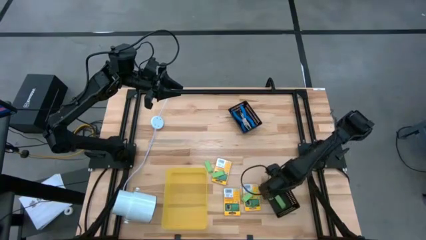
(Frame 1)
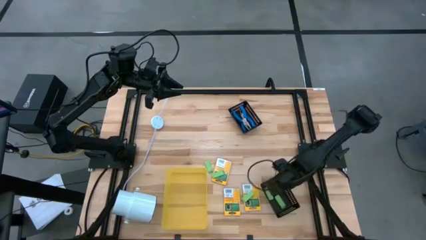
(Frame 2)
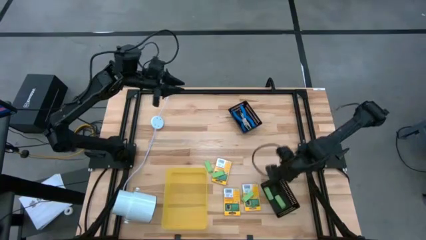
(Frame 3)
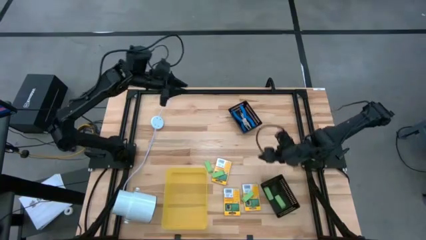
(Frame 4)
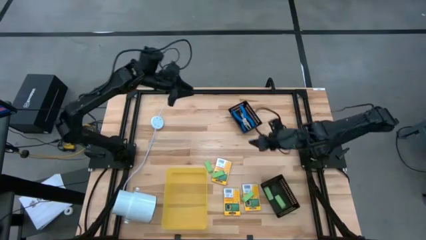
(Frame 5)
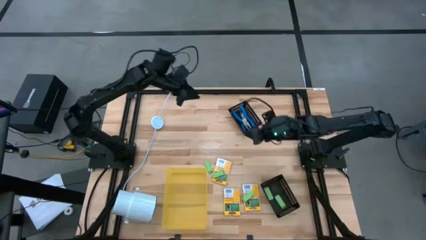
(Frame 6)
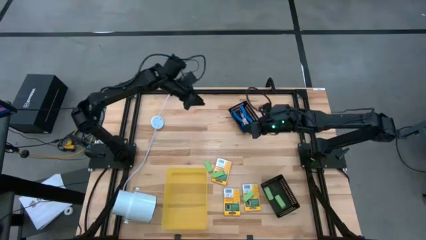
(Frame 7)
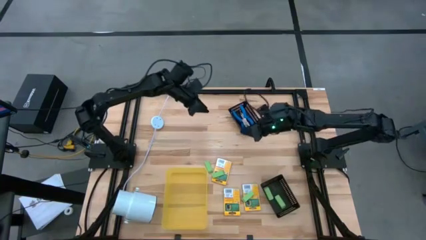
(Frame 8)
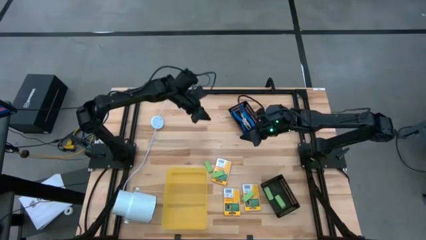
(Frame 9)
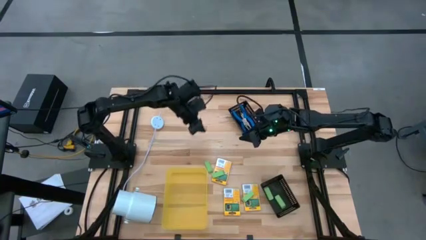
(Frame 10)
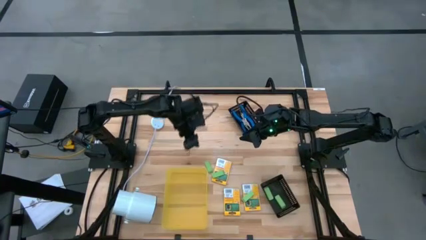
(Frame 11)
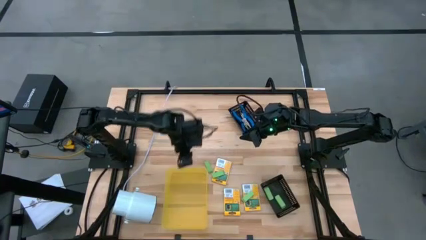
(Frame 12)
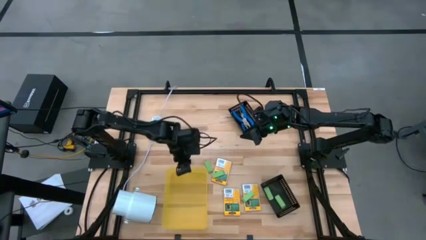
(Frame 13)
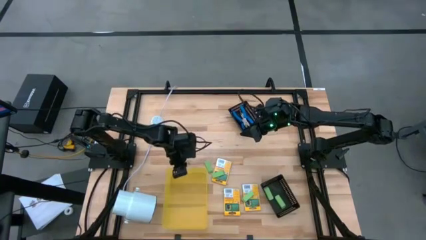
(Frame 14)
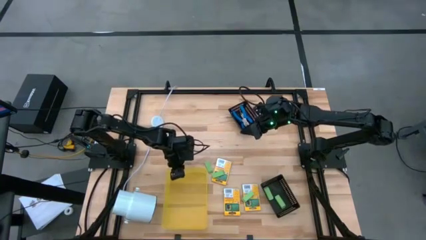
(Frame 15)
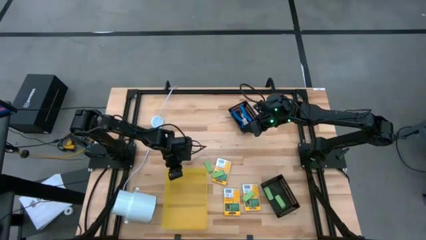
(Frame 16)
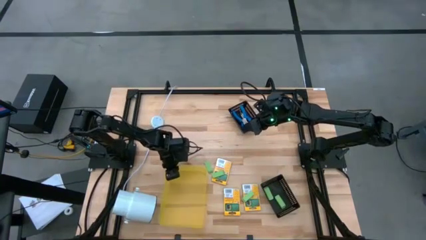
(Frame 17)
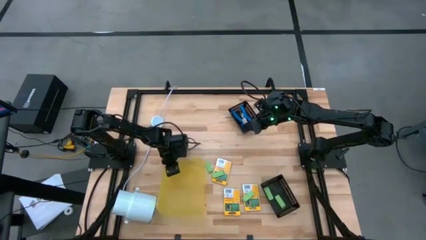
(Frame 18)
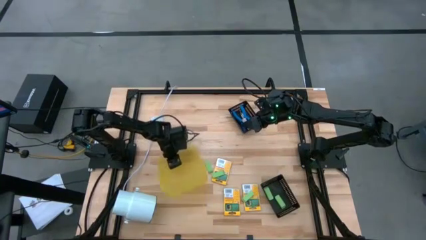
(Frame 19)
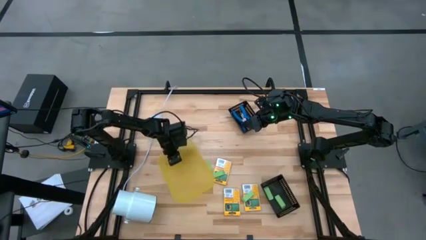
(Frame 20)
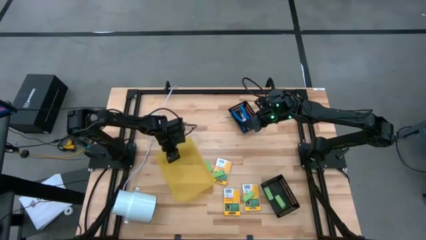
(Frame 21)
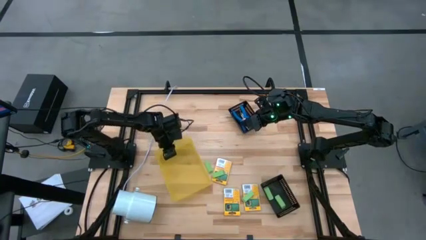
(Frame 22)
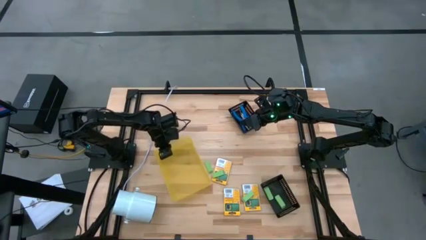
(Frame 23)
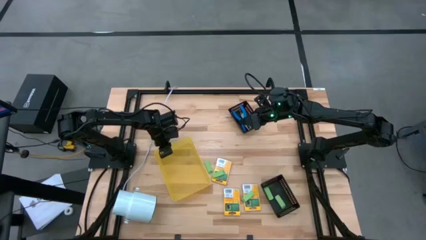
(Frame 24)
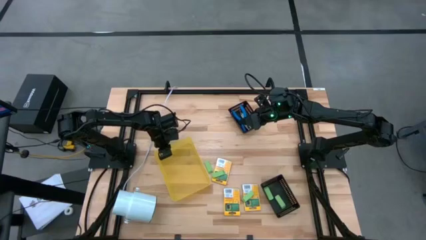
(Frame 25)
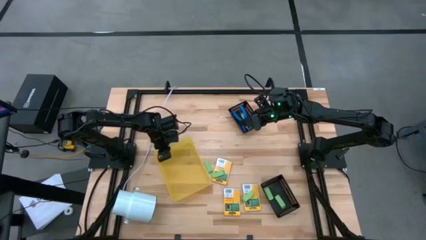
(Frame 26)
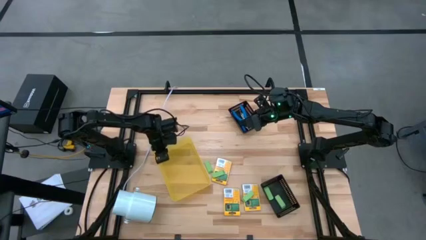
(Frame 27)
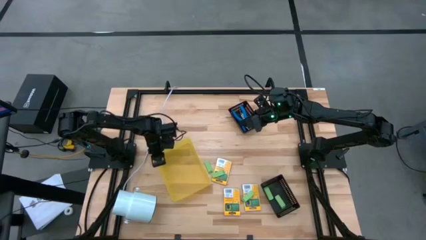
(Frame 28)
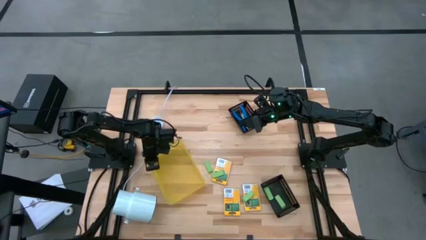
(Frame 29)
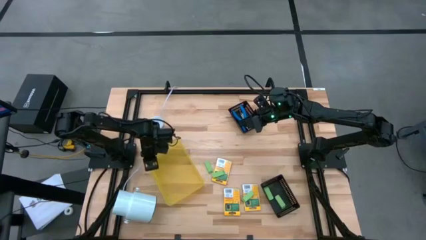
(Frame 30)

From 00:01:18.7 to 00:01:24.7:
Task: Pick & Place School Supplies
Adjust the yellow bin

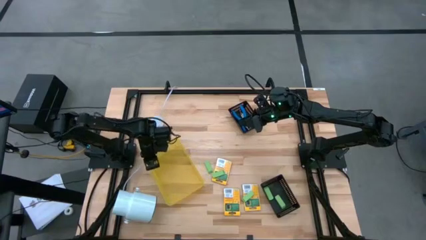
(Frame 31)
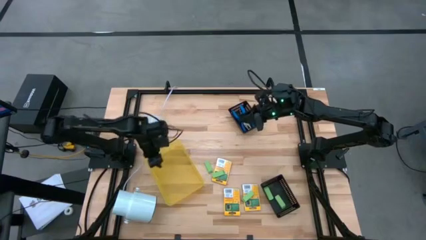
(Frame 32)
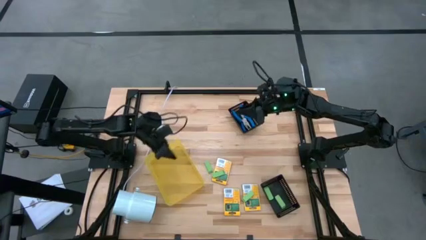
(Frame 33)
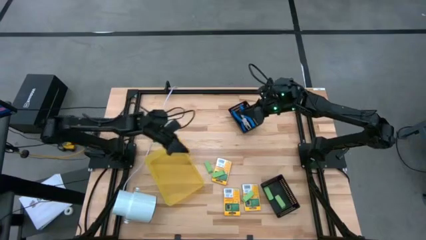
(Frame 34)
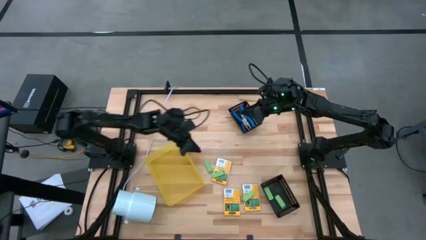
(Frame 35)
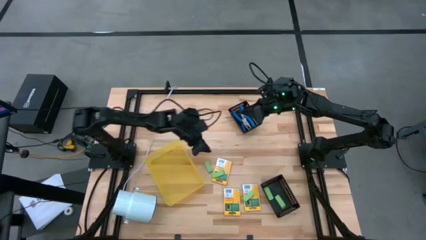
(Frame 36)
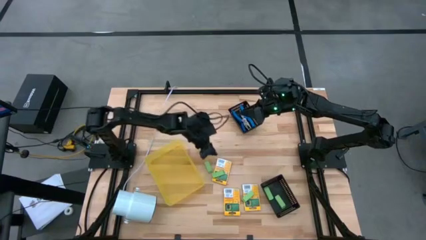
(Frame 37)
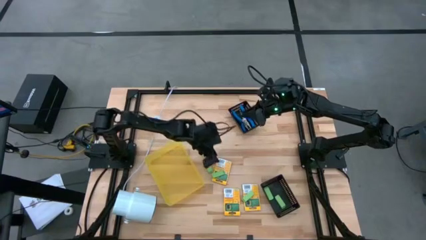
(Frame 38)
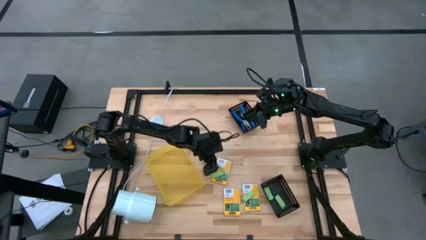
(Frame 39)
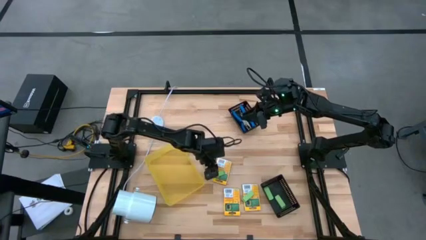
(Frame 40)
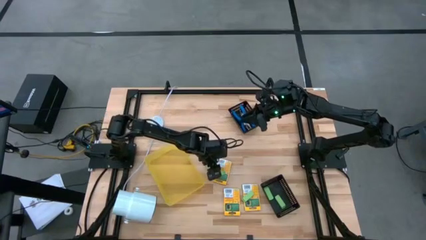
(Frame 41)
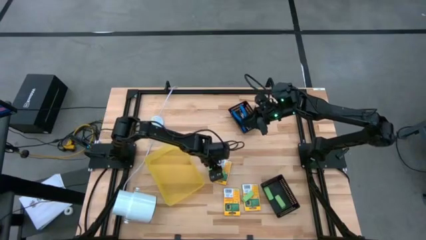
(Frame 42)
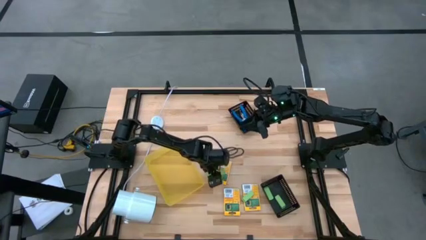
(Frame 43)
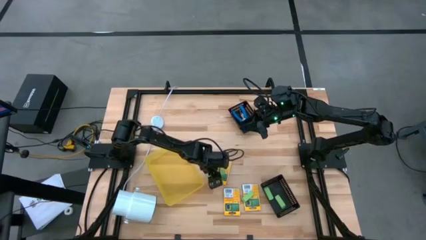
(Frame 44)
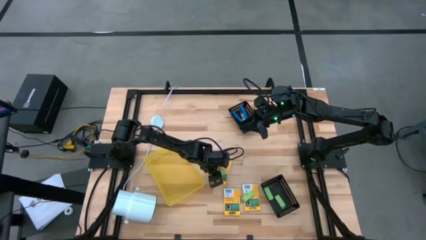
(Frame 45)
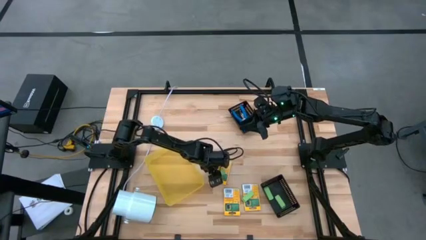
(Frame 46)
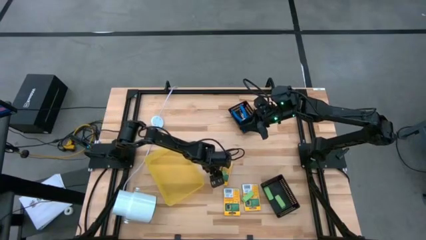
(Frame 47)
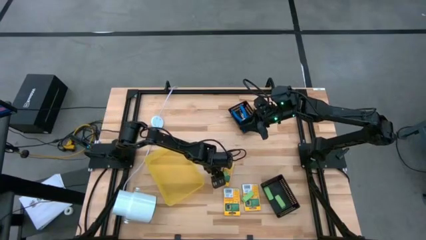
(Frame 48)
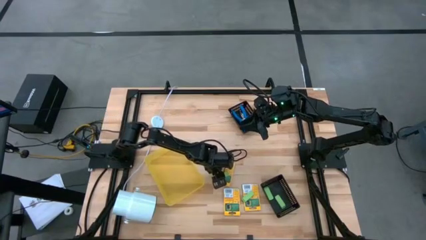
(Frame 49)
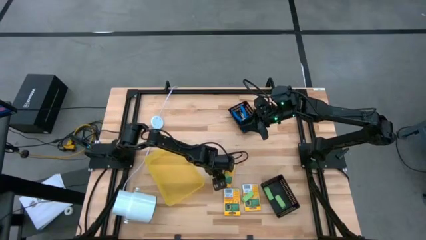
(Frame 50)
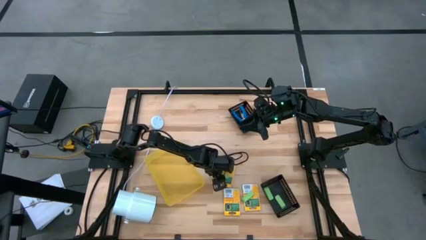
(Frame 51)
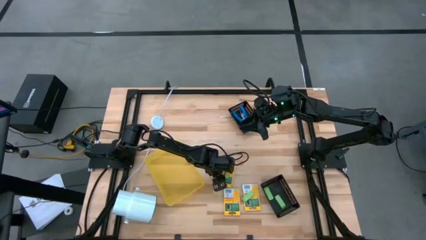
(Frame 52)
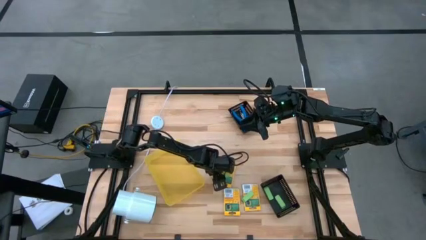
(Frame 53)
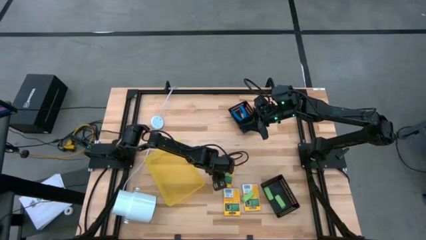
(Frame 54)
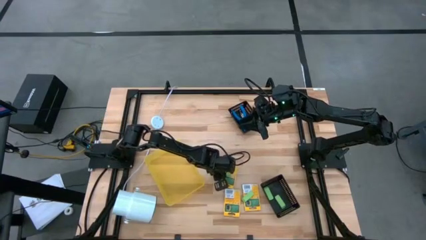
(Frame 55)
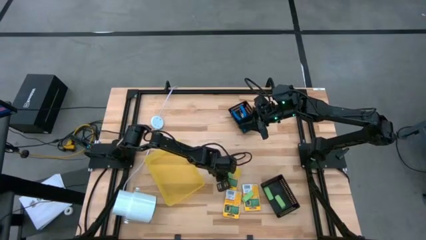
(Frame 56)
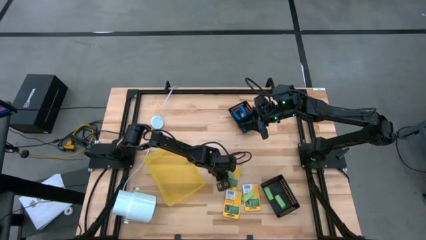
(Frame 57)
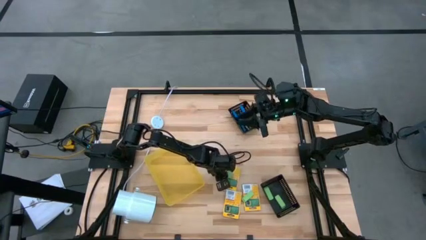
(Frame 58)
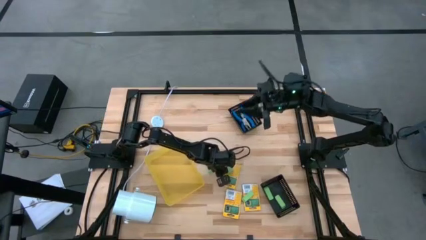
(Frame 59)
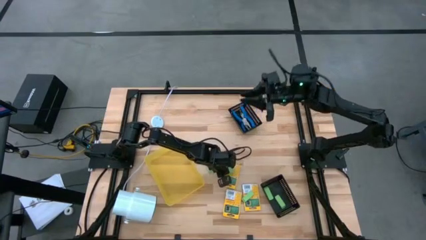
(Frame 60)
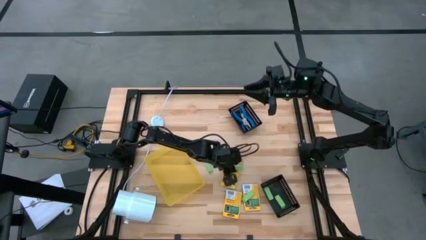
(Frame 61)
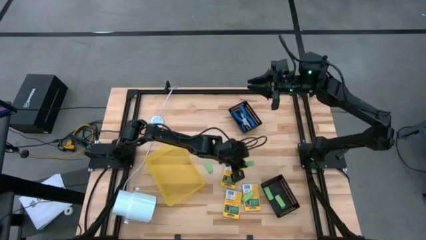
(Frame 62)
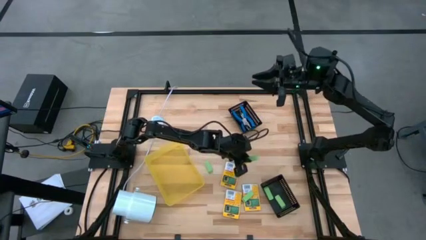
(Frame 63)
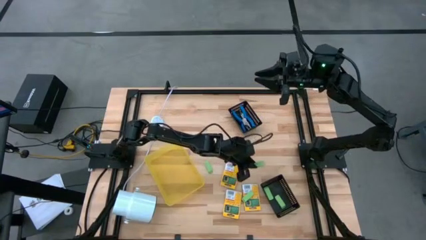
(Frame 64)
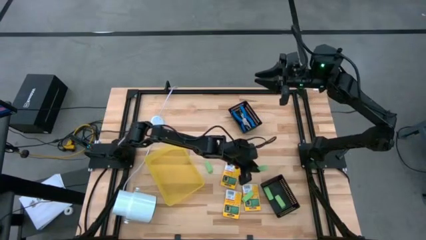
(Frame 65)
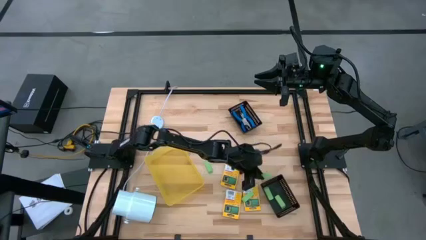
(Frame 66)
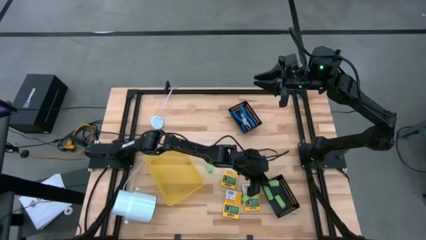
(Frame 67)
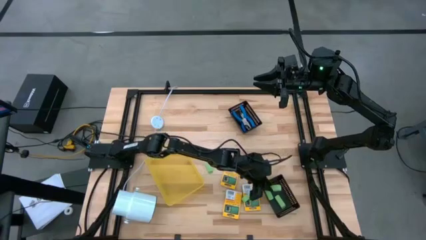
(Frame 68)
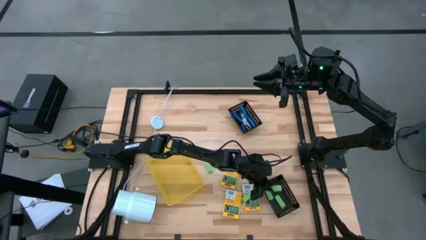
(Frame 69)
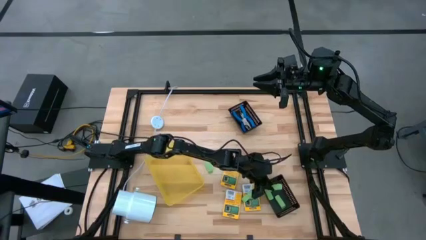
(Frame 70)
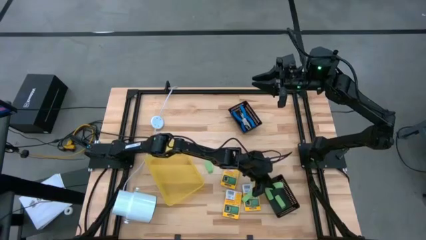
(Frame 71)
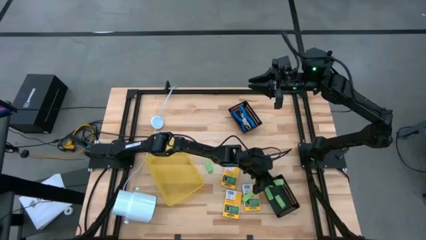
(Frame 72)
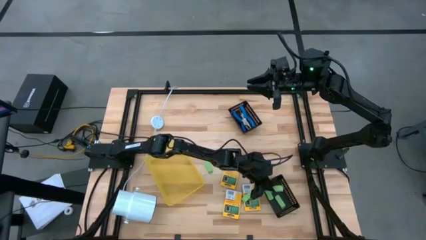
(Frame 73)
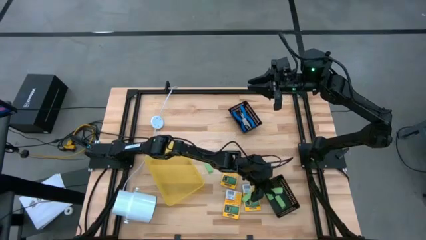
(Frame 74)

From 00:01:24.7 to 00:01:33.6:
Put the green eraser into the bottom black bin

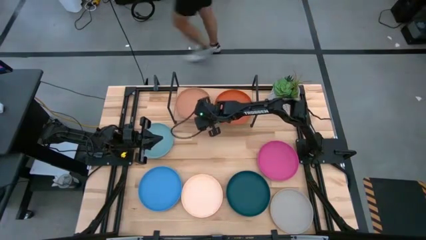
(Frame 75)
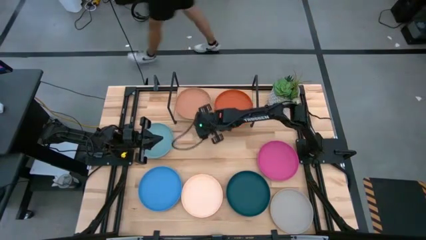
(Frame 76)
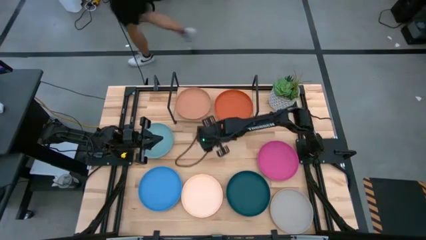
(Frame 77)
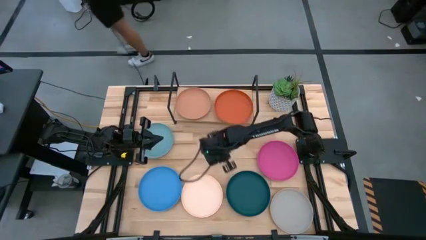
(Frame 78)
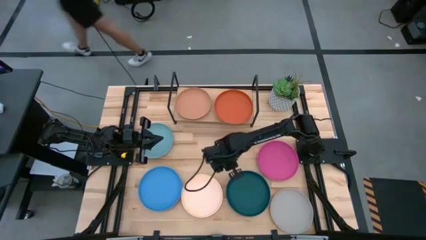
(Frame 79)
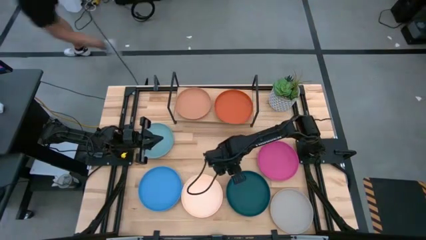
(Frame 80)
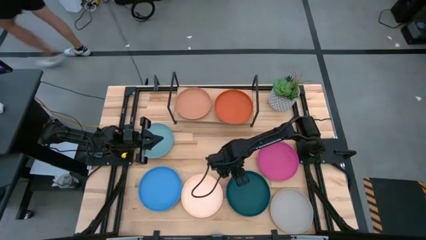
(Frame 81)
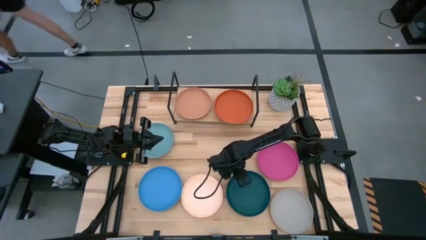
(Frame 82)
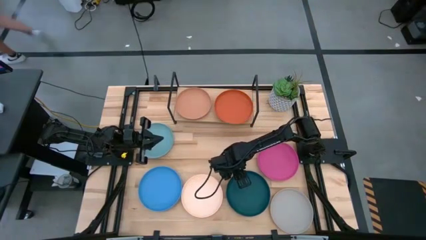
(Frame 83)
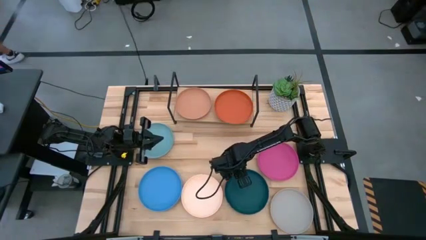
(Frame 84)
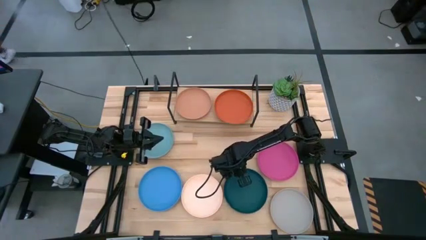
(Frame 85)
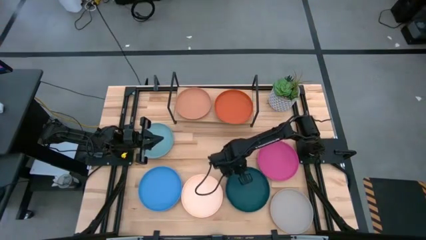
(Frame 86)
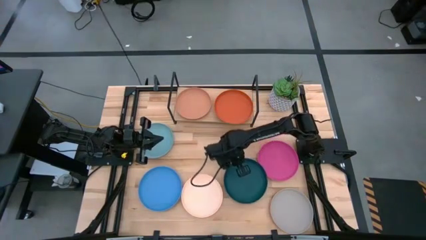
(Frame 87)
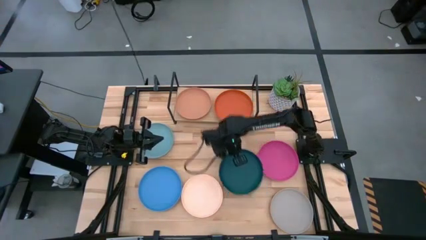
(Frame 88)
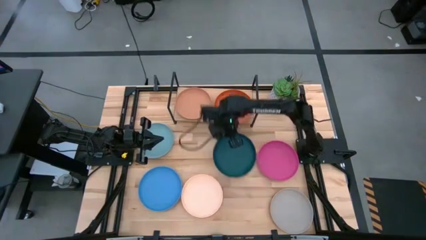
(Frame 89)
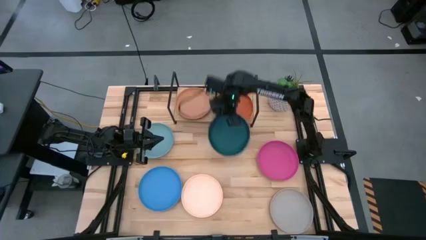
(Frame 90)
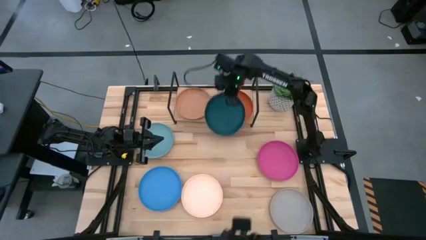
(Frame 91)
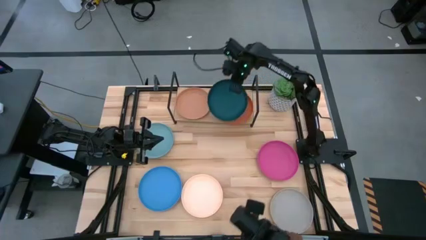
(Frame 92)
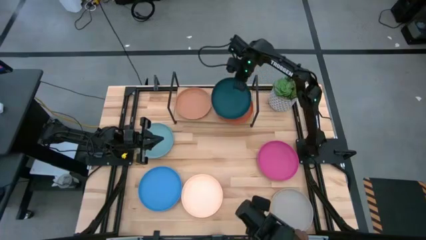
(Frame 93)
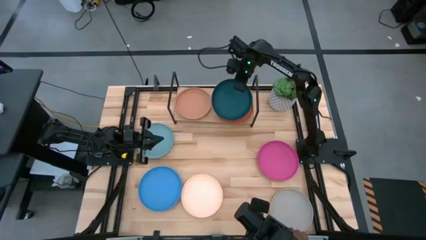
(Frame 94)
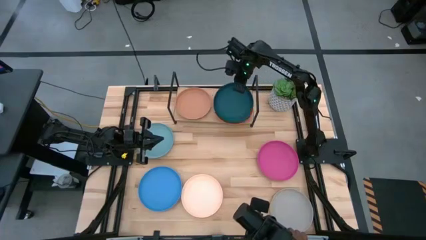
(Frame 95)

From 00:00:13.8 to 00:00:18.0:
Task: Place and stack plates onto a shelf
Stack the dark blue plate on top of the orange plate on the shelf
